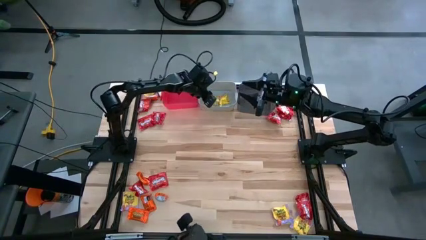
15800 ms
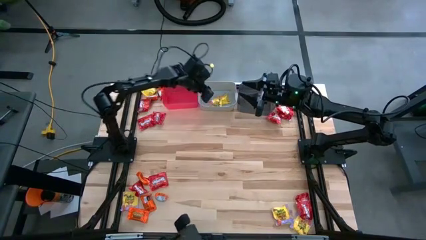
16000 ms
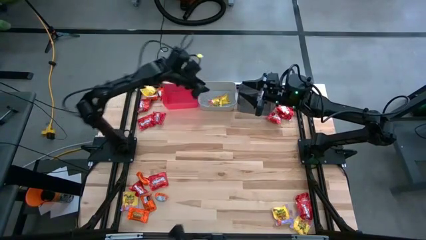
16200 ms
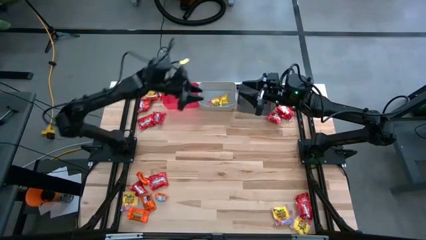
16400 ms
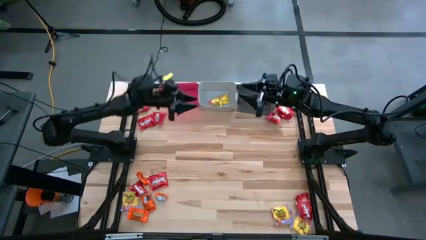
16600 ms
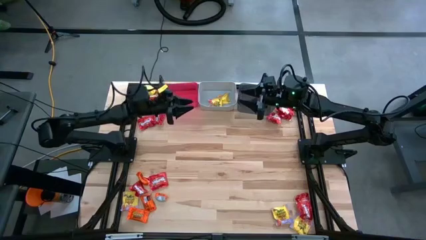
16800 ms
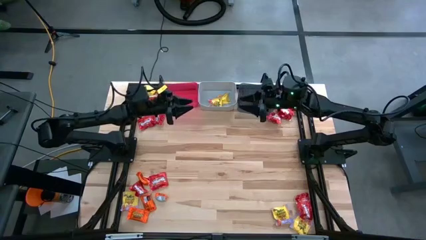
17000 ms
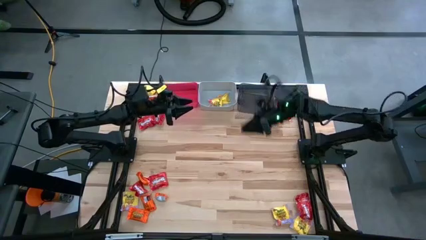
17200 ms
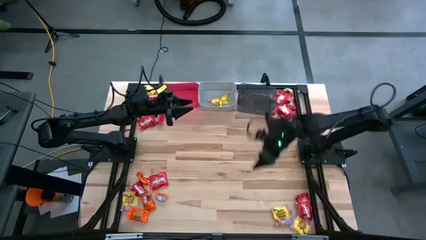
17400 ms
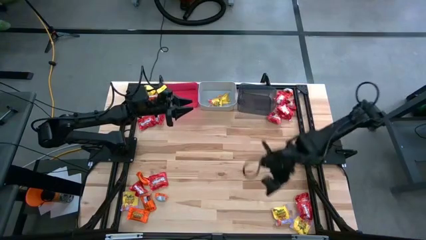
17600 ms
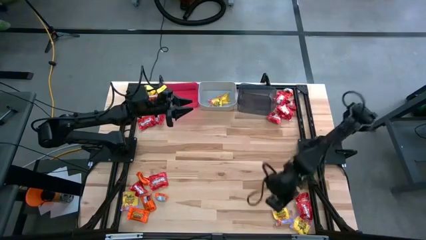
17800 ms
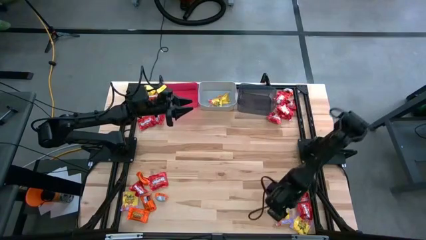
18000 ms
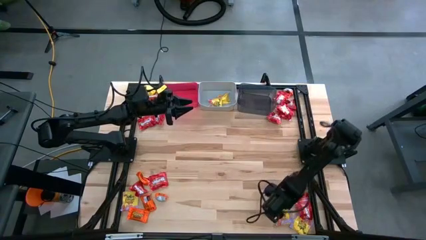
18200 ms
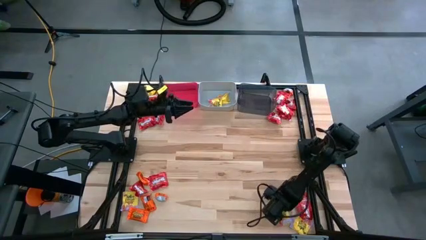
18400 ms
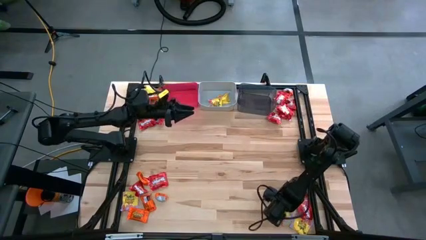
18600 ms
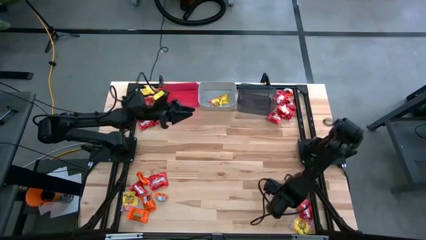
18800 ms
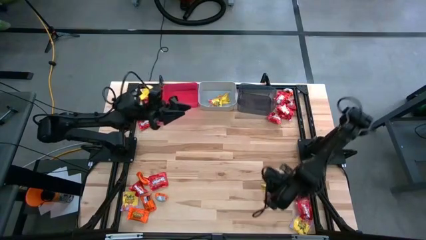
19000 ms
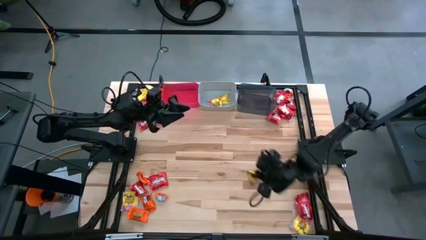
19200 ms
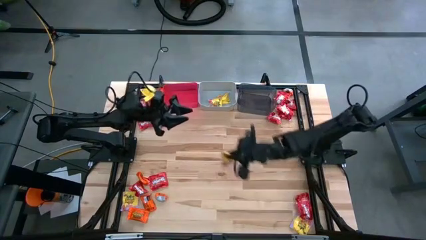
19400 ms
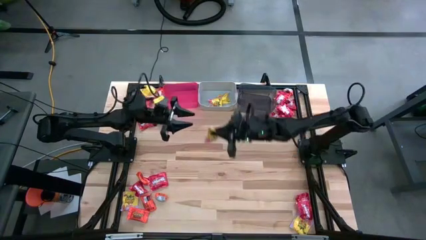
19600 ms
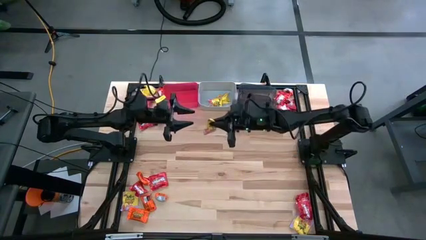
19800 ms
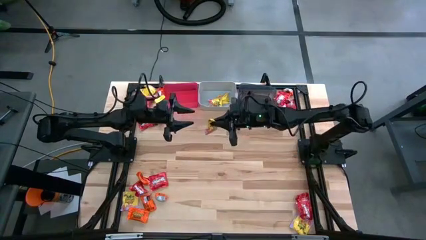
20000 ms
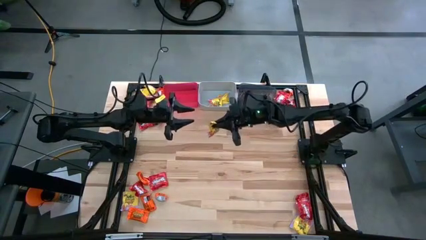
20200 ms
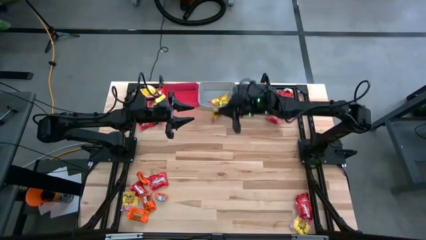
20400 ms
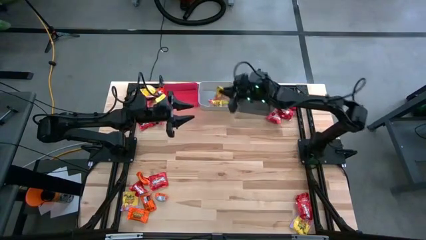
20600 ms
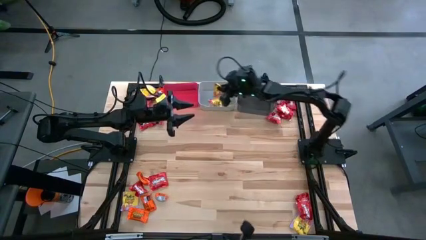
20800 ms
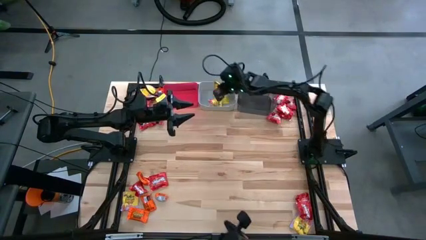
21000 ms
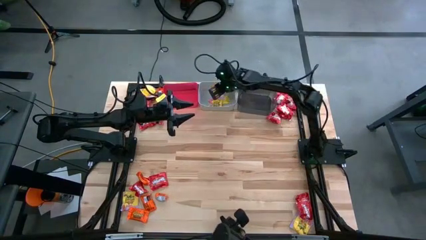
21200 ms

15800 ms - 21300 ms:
Task: Sort candy
Put the yellow candy into the gray bin

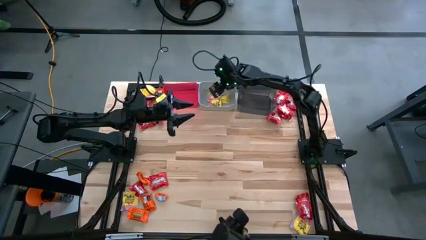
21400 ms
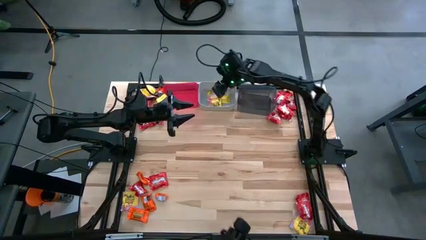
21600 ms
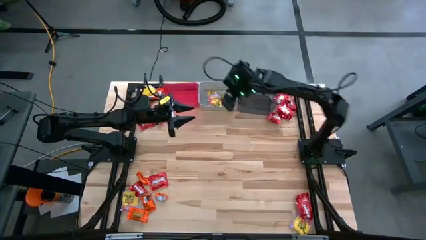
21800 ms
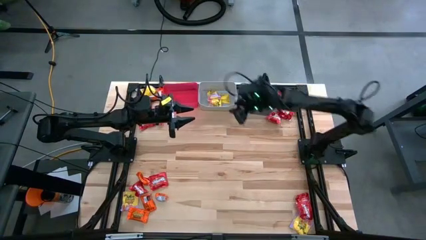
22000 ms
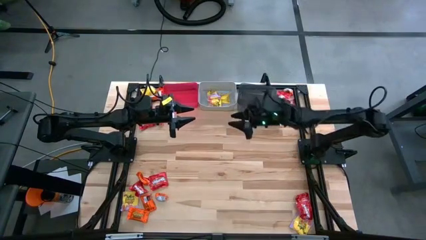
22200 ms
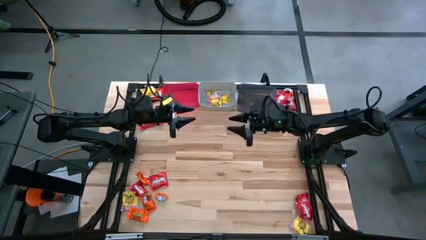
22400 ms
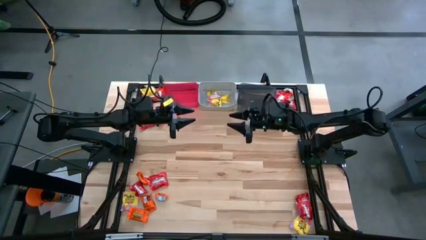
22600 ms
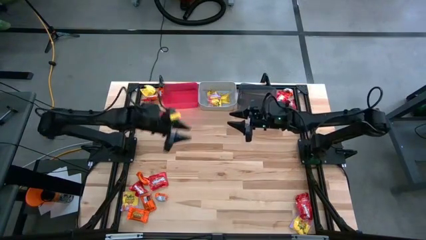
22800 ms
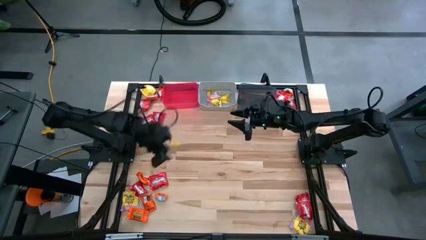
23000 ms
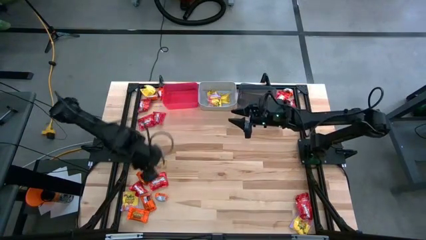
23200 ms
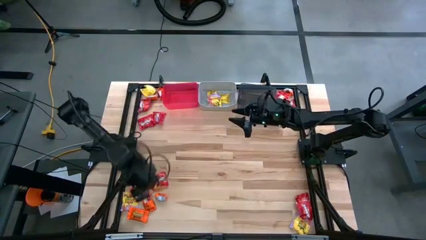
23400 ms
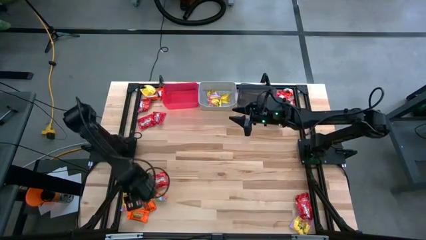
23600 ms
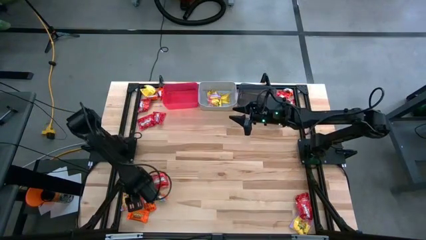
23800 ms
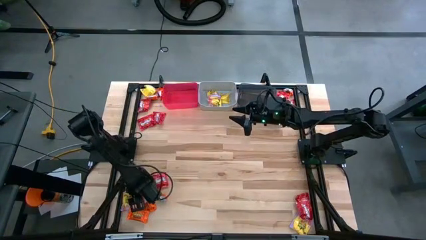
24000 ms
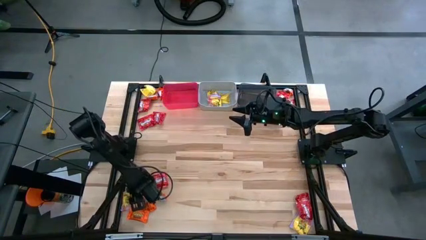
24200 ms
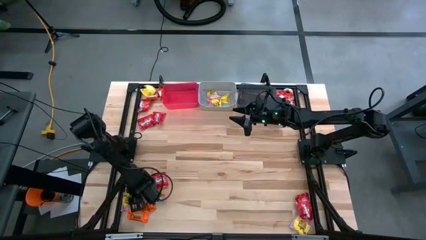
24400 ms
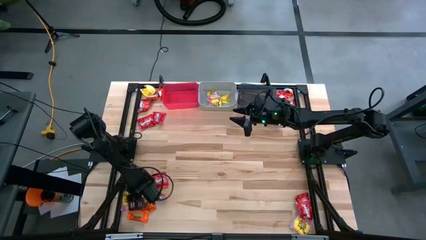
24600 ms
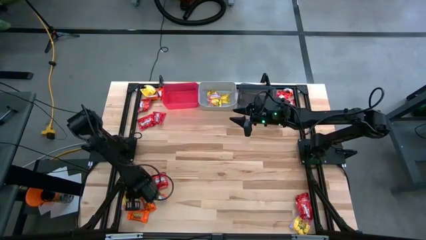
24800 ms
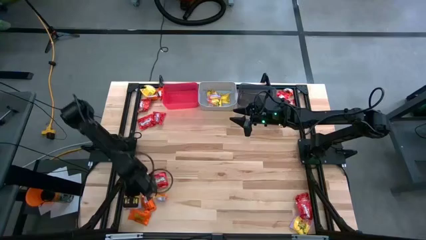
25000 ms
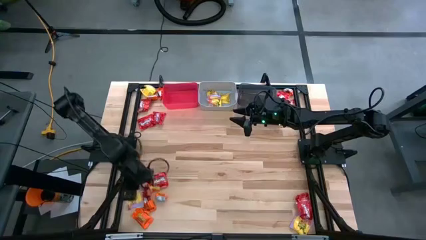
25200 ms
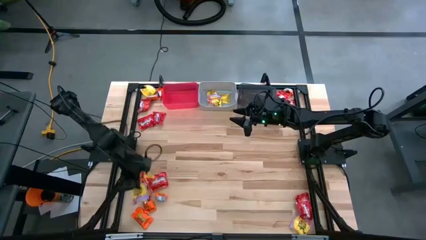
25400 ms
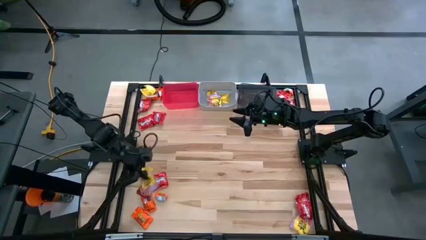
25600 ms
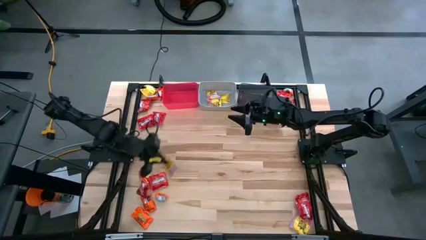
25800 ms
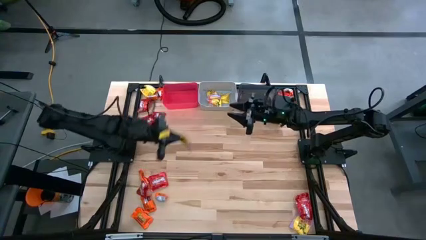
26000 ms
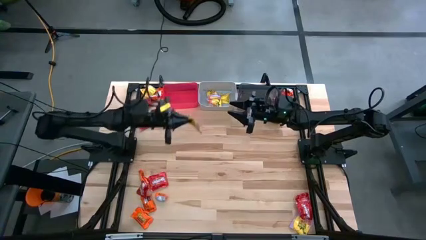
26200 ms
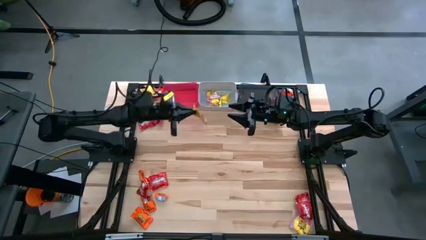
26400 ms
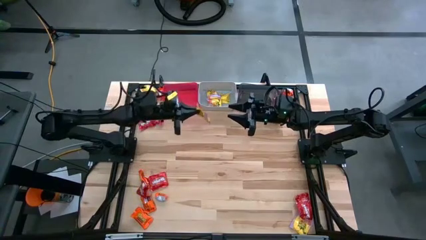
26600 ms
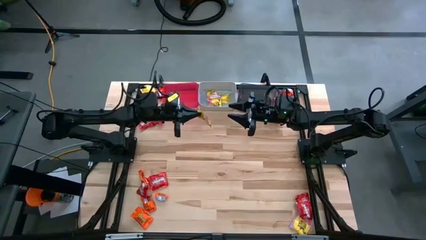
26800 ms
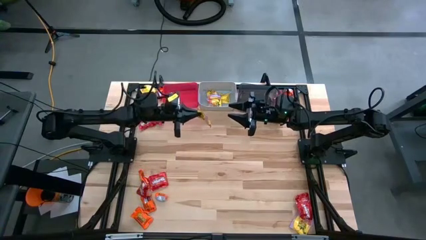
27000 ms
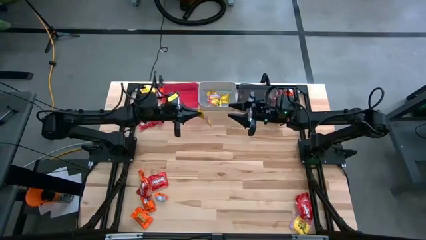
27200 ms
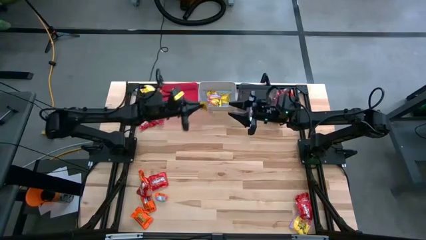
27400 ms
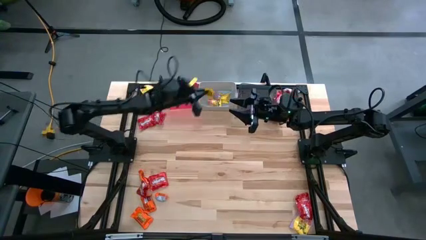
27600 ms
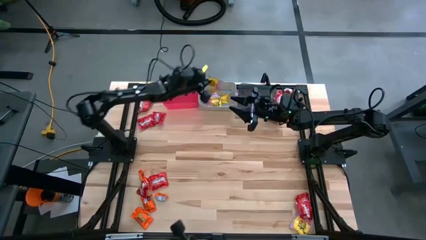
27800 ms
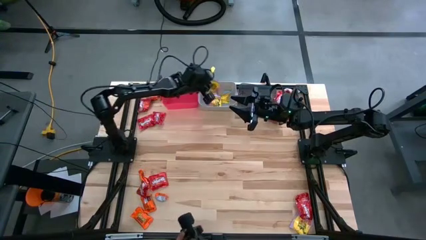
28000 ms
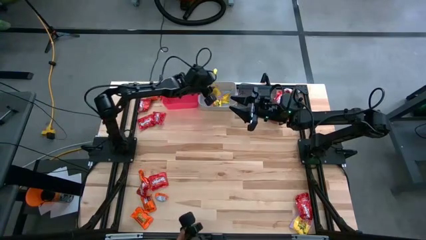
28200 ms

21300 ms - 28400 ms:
Put the yellow candy into the gray bin

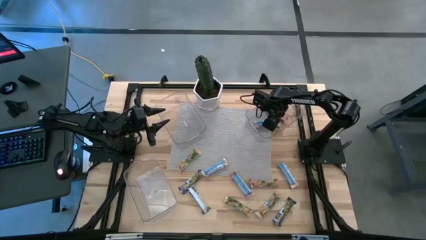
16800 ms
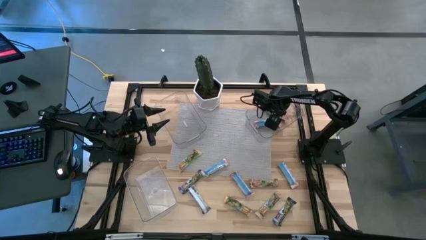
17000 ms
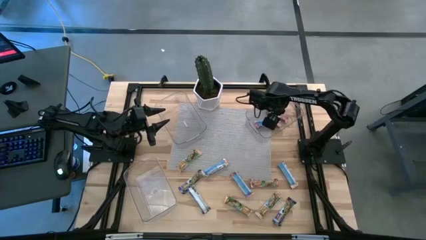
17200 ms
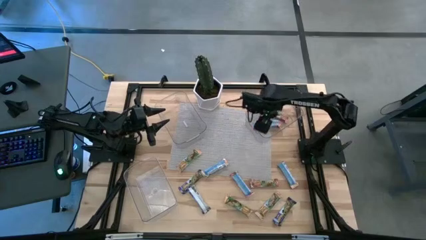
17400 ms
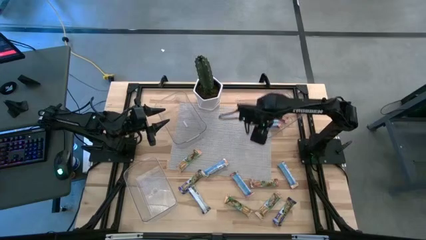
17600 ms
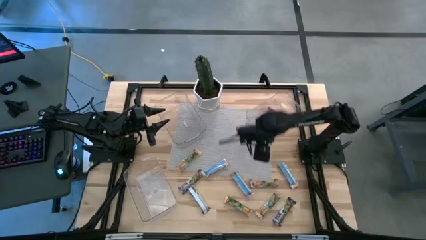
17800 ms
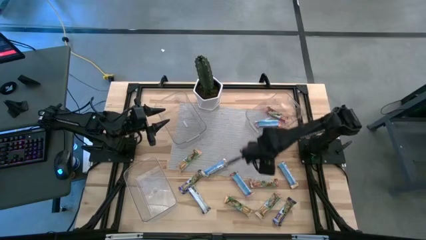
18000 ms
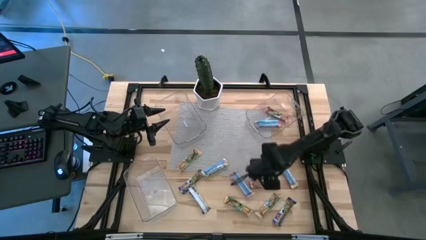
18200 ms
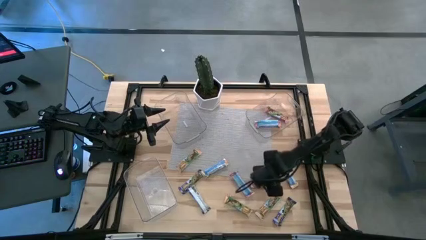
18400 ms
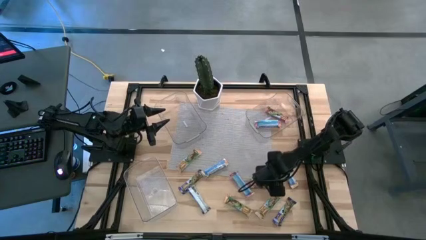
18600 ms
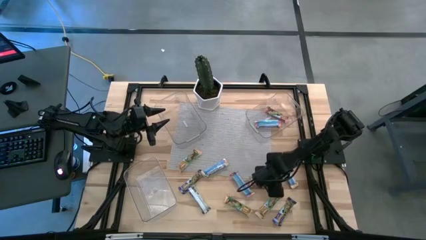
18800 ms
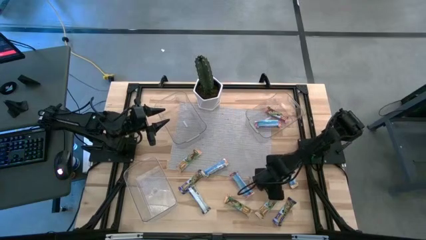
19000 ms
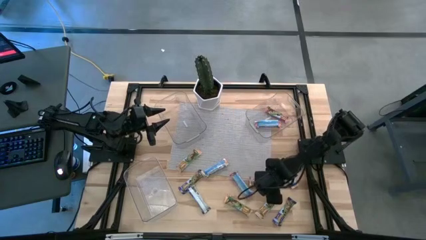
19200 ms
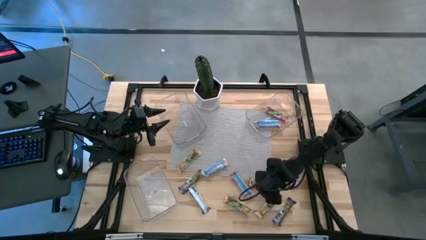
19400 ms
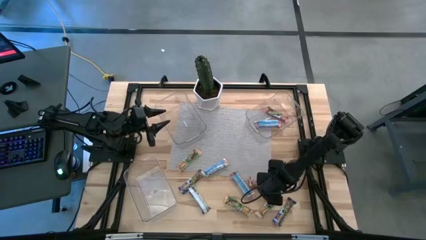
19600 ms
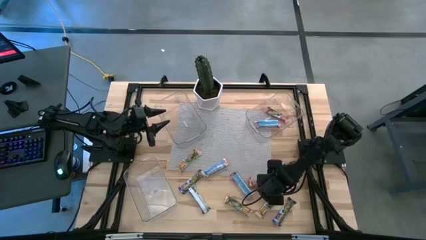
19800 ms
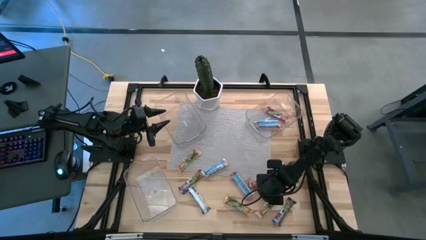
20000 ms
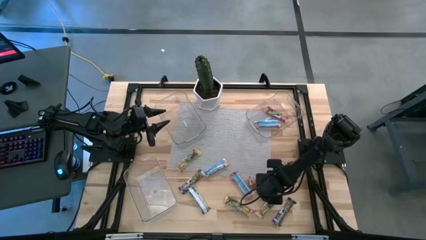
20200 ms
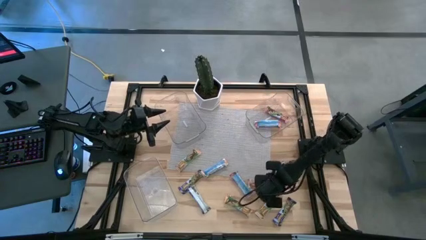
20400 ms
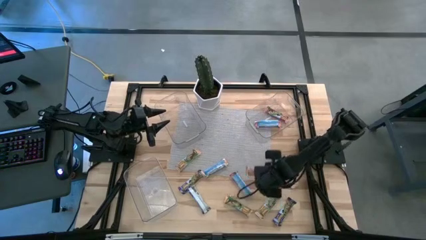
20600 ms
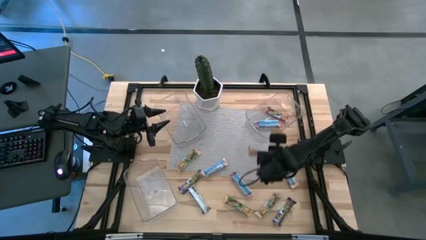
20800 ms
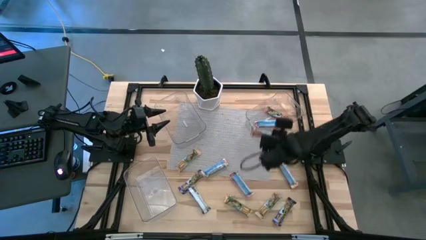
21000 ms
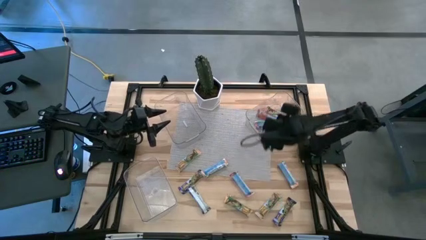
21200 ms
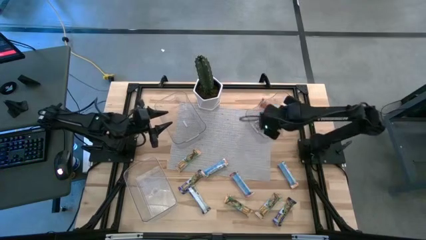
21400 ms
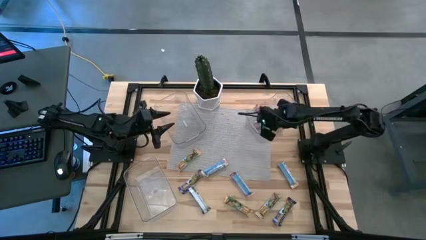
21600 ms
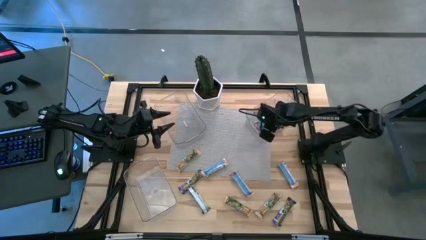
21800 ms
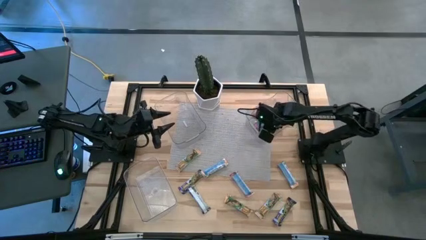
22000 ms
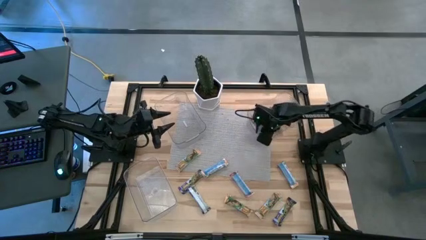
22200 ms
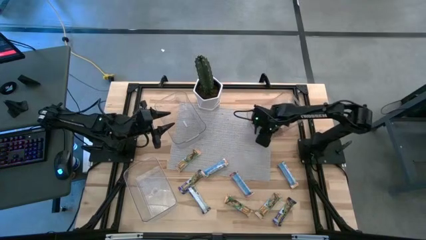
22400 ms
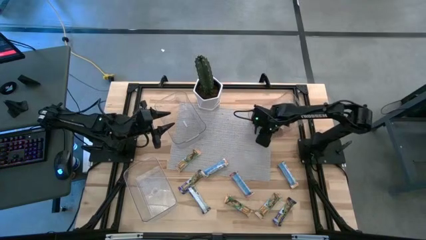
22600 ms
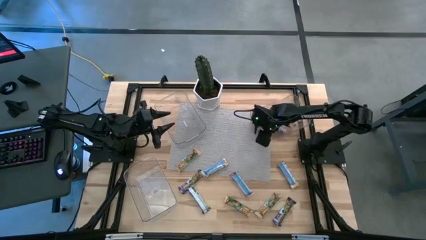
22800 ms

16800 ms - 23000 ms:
Task: Pick and place Granola Bars by type
Put the red granola bar into the top right transparent bin
